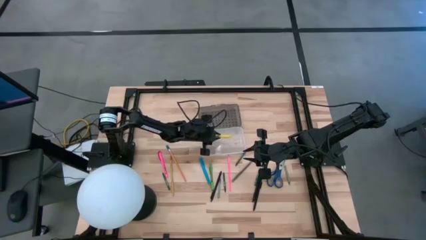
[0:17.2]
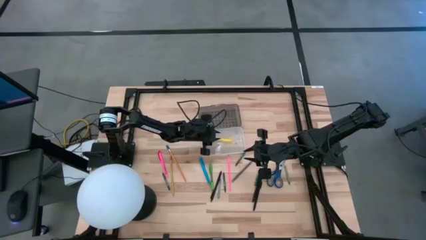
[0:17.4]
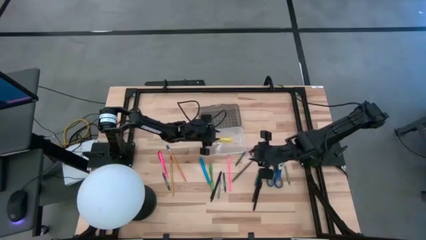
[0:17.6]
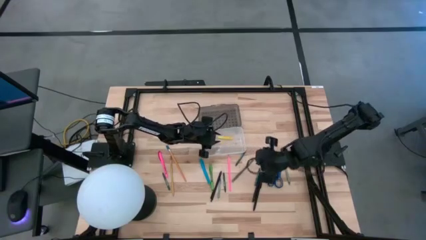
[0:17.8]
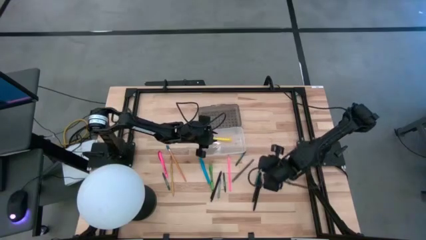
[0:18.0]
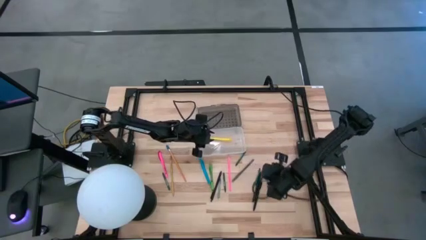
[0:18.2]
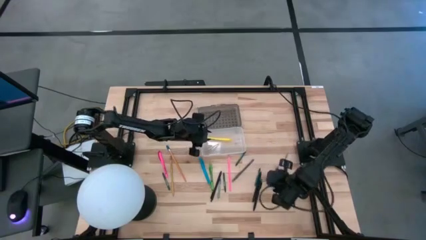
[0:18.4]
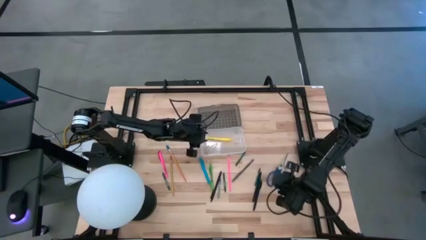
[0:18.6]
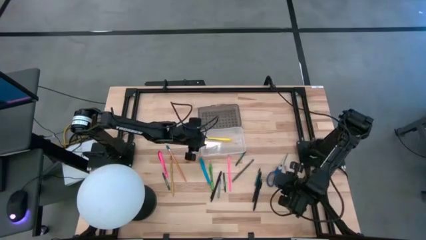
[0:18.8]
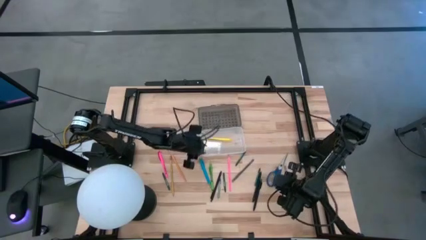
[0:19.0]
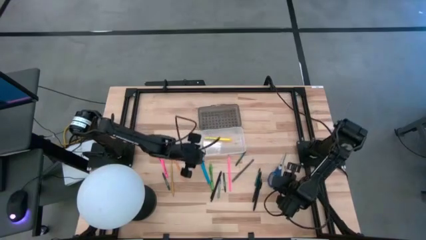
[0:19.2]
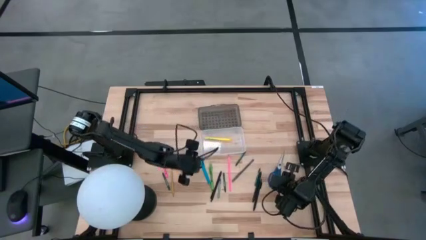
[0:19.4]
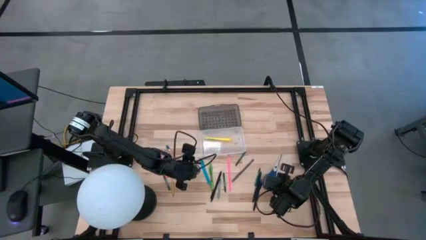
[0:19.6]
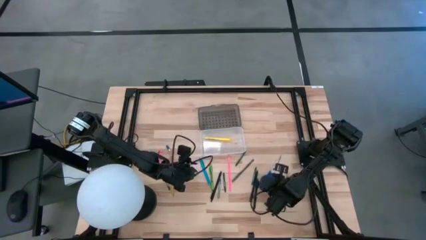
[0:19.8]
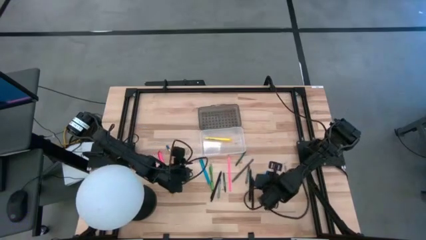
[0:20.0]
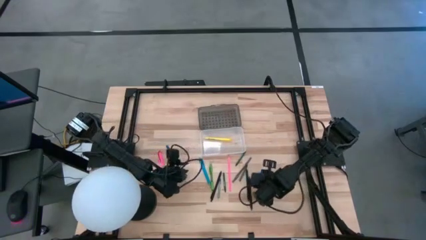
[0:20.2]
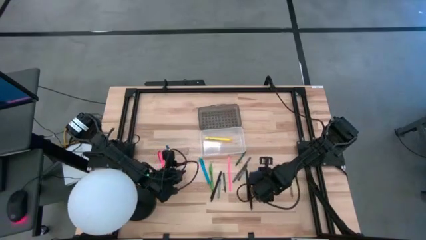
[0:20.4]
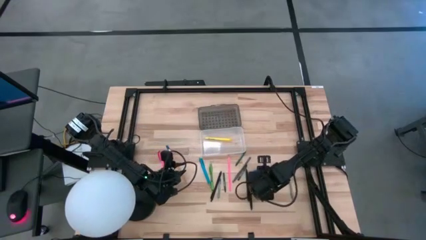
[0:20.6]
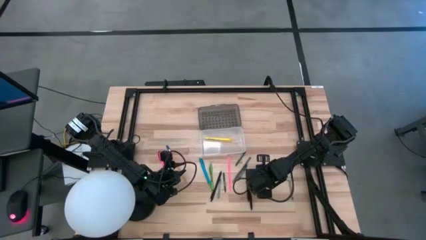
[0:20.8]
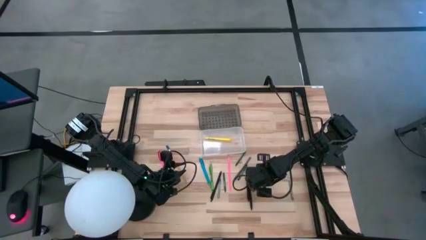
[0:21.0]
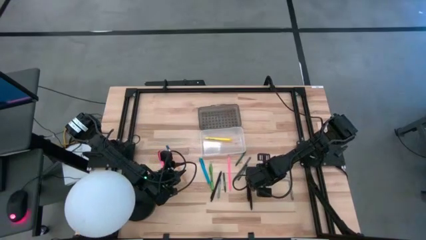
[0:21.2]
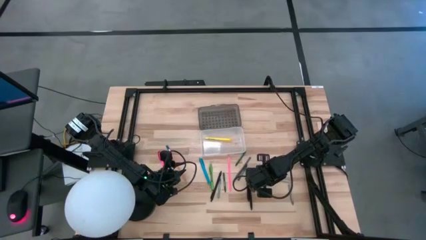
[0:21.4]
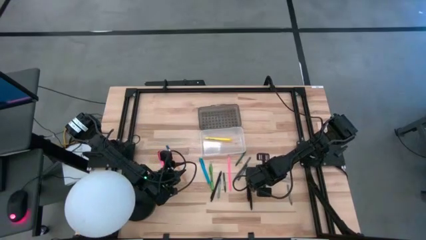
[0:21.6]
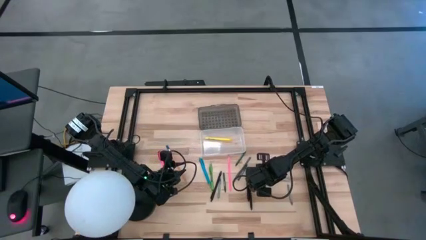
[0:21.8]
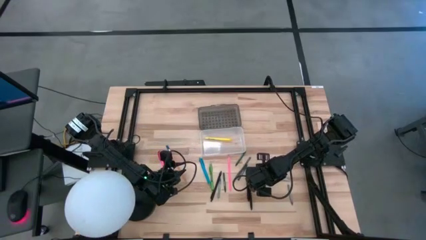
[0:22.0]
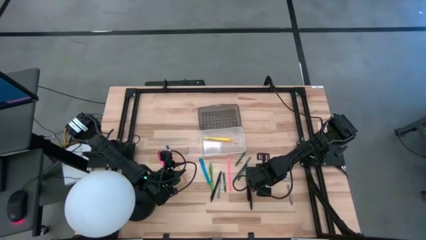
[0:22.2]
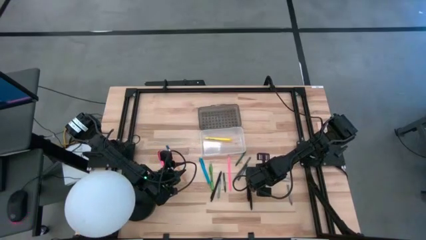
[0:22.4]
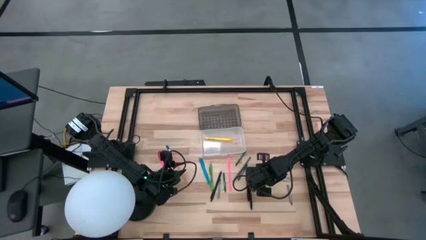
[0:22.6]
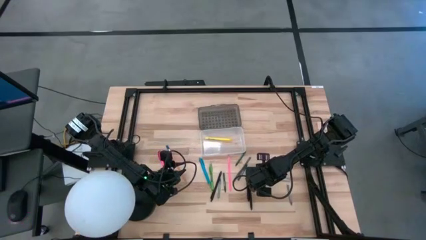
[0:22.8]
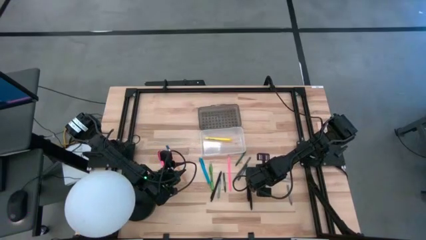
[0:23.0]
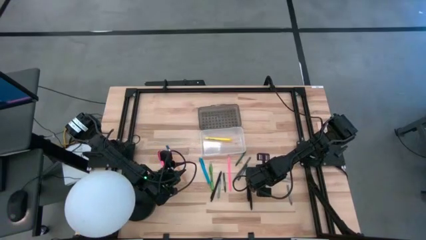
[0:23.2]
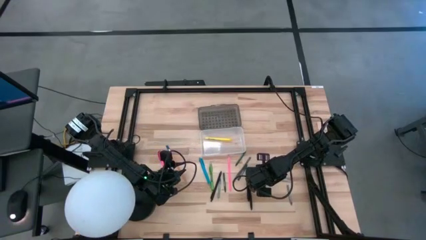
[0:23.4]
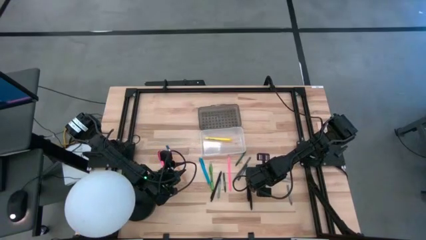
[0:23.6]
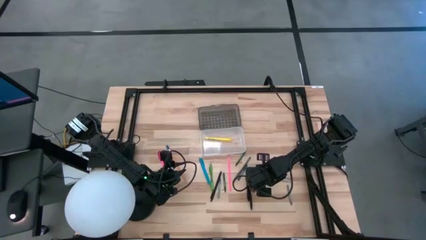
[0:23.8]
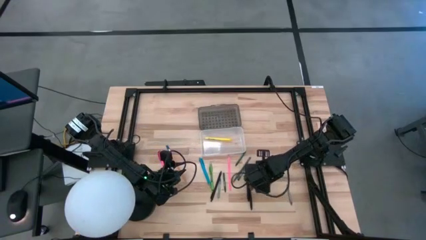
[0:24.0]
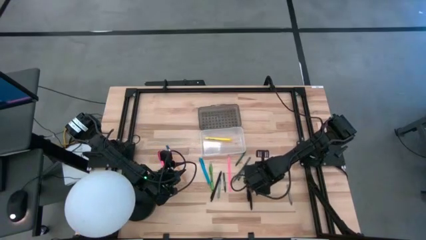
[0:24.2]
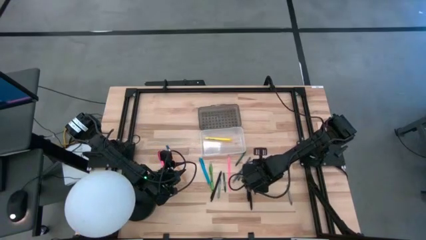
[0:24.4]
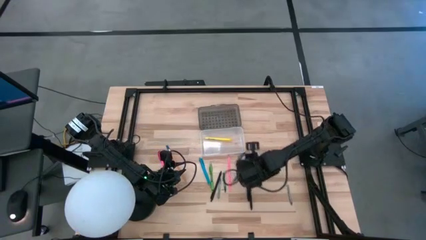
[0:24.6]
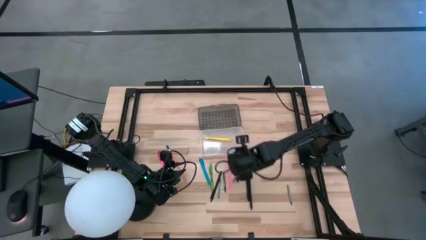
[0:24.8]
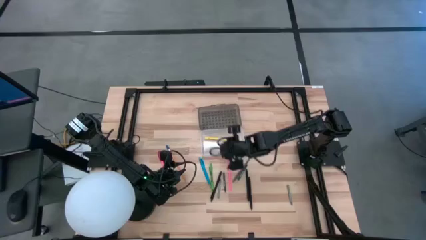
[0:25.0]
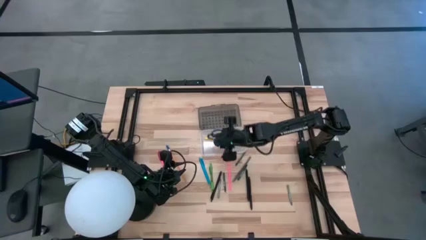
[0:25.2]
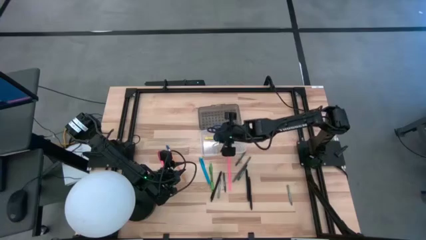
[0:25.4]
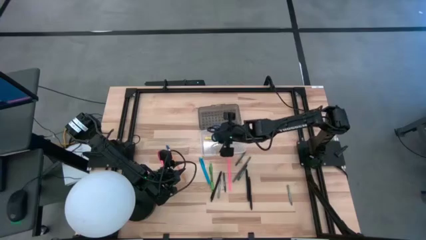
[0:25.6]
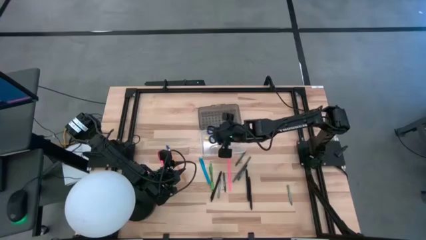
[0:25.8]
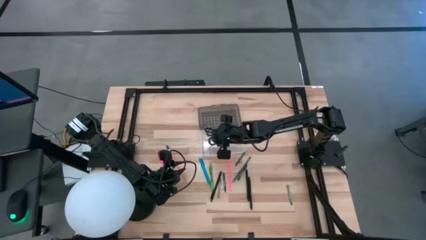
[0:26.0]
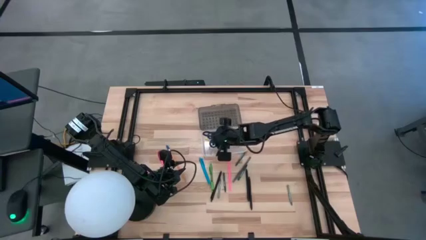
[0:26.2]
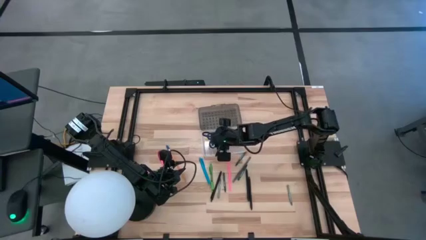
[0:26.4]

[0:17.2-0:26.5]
Task: Pick & place school supplies into a supply box
Put the blue scissor into the supply box

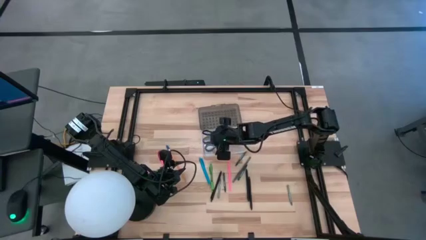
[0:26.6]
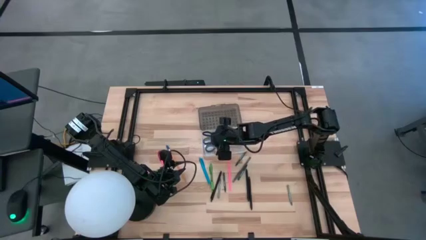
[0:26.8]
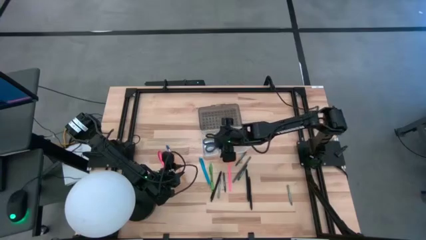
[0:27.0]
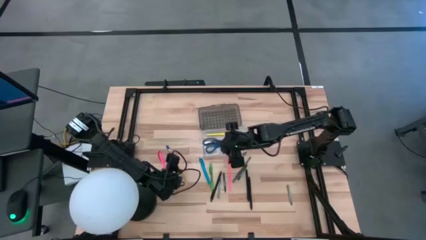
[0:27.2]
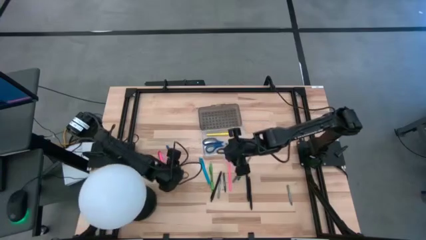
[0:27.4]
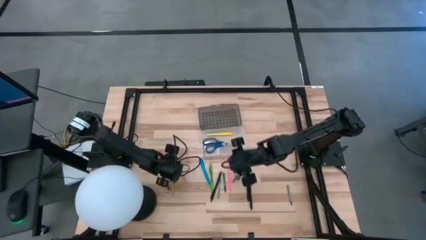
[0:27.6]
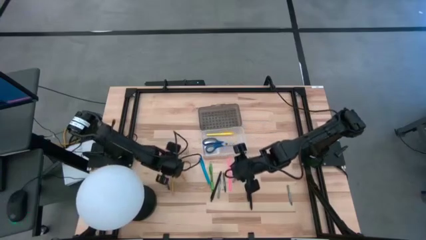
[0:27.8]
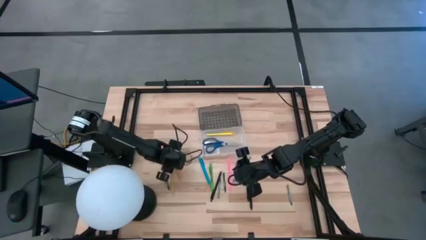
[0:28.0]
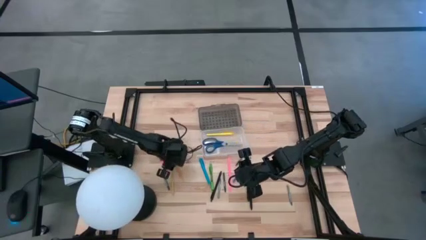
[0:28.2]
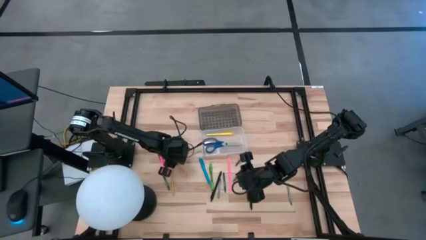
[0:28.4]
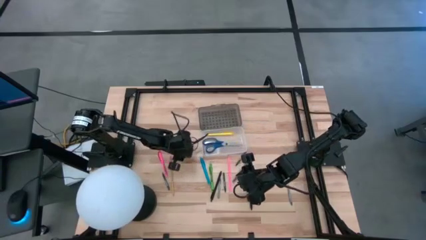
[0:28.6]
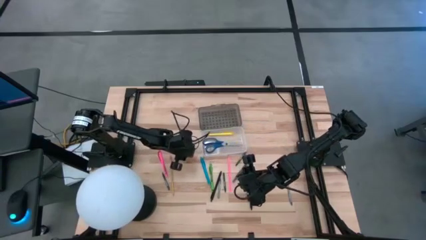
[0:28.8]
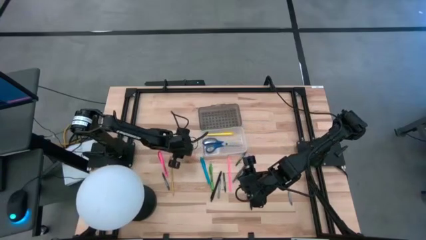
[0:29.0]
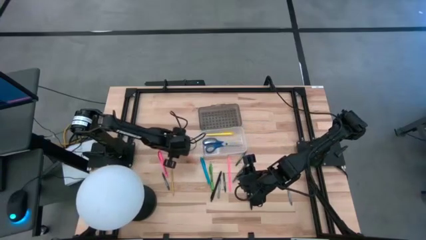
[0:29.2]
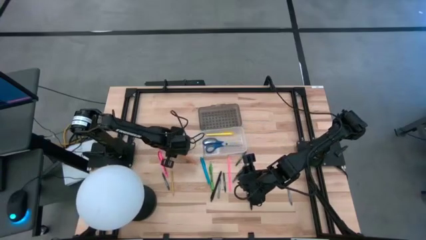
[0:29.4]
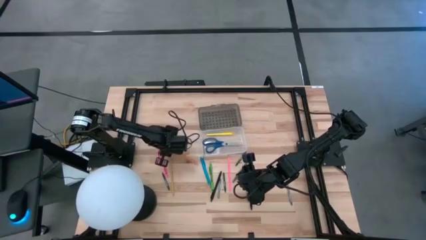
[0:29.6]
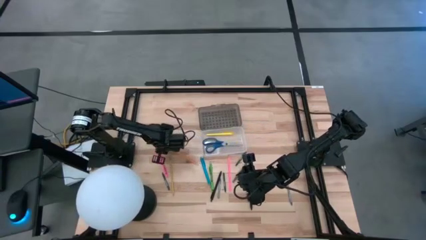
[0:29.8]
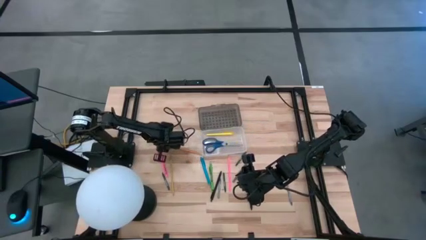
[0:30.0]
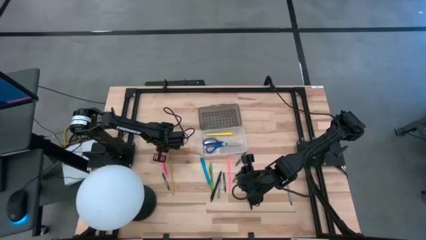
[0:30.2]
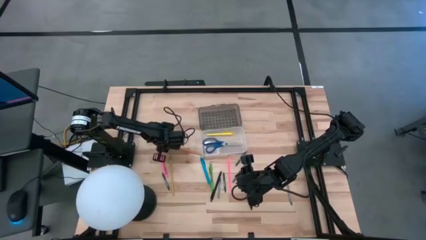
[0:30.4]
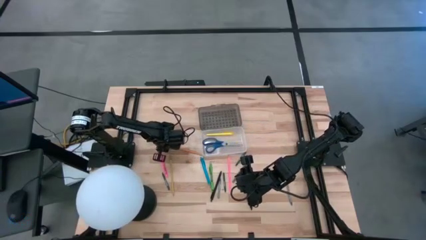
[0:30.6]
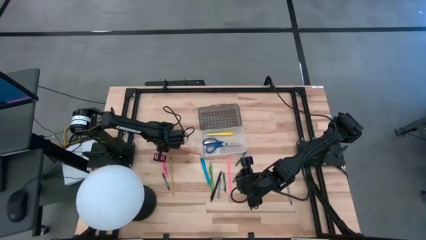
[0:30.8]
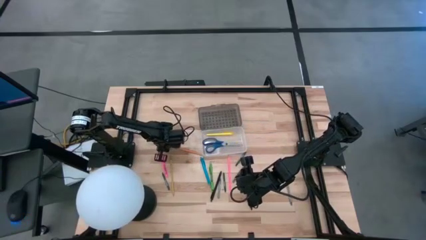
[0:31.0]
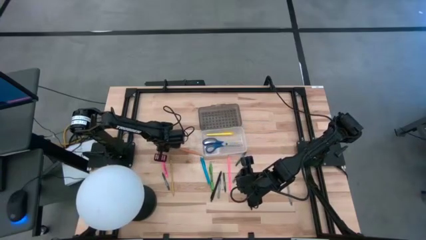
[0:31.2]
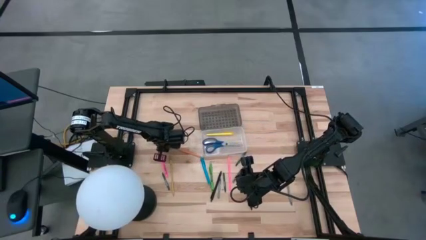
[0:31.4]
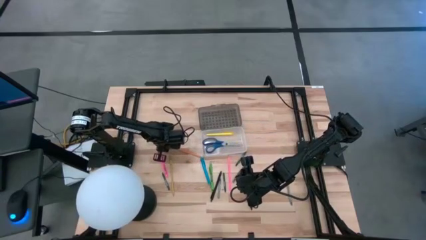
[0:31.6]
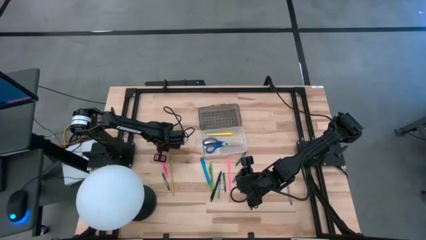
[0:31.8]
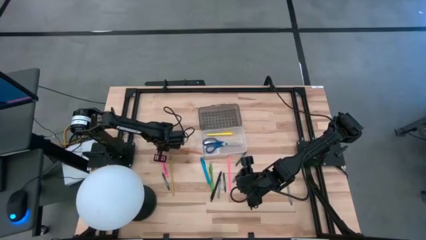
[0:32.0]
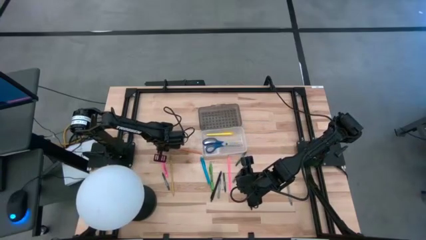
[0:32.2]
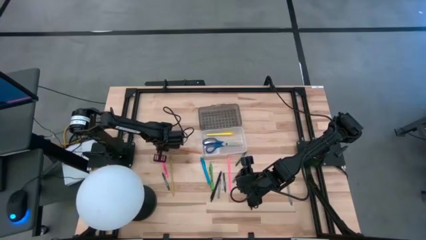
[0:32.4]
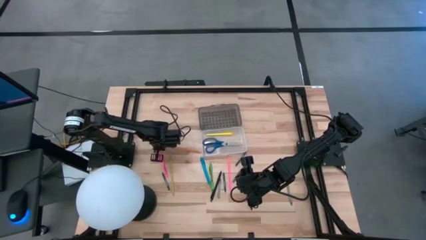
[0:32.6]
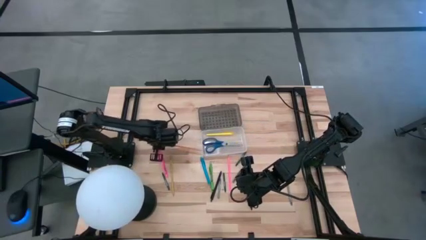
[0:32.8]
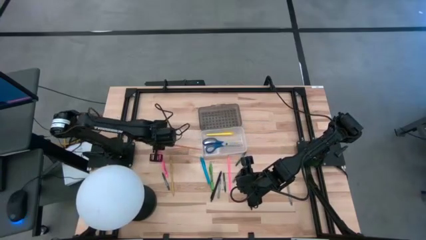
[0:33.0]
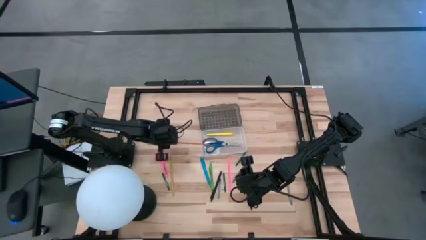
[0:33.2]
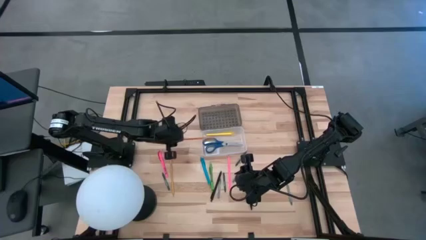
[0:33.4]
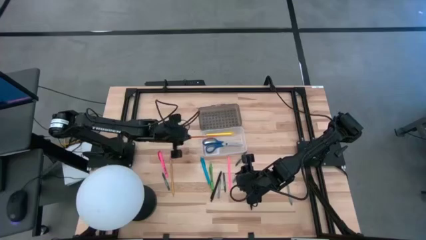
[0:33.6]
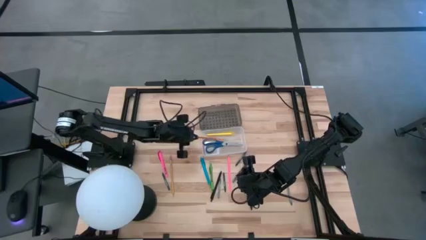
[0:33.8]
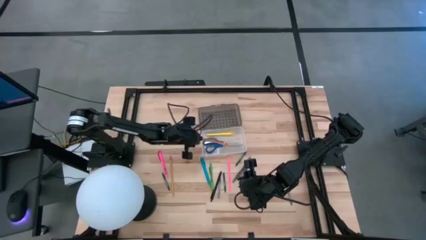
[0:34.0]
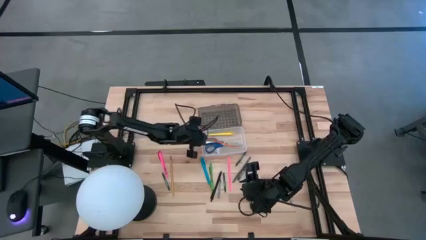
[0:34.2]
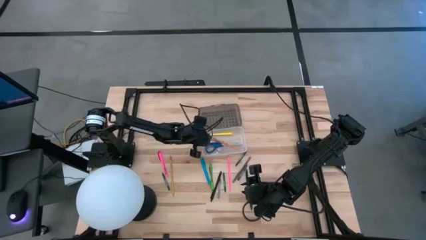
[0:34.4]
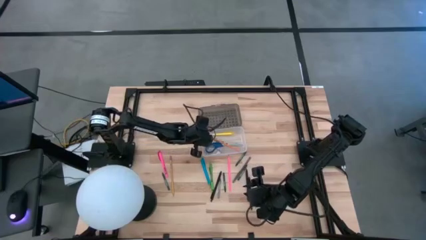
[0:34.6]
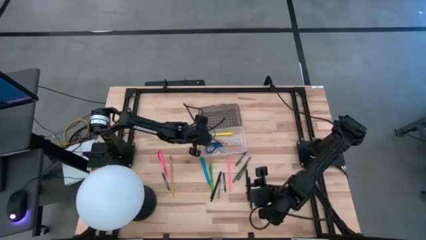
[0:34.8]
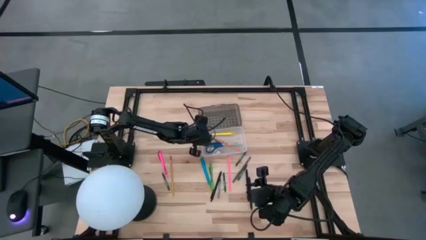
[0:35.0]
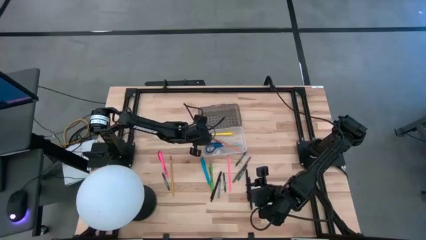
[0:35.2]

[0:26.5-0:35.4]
Put the orange pencil into the supply box
